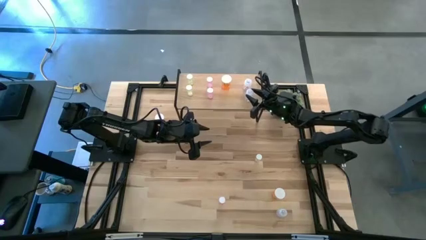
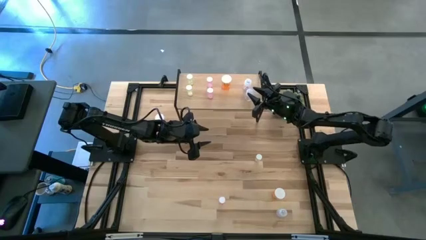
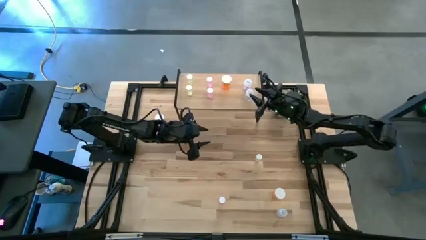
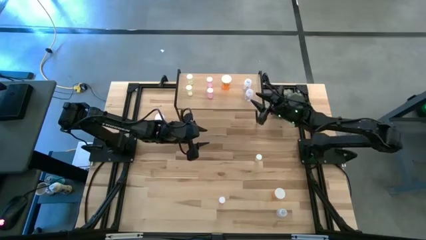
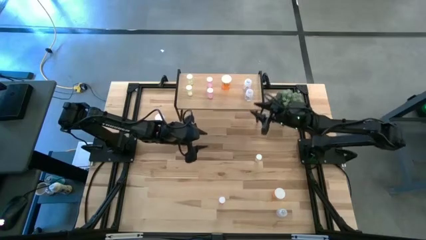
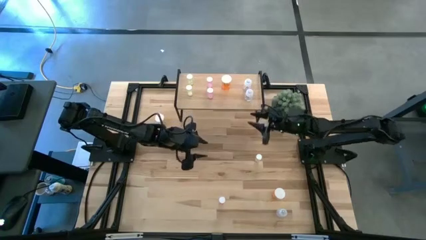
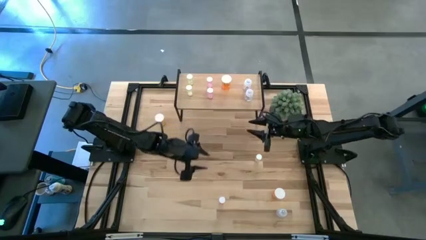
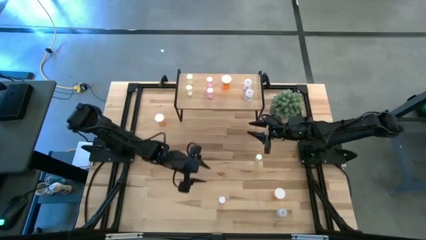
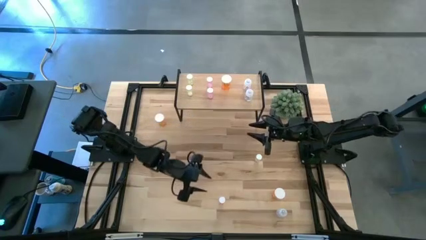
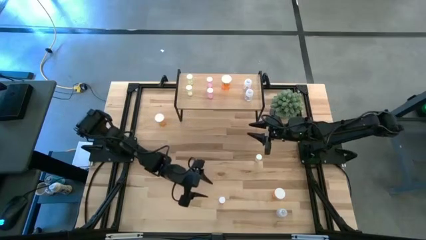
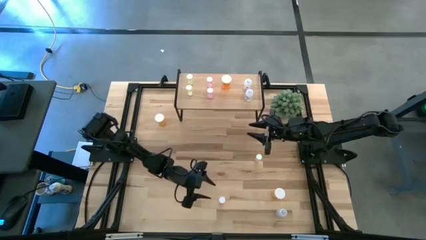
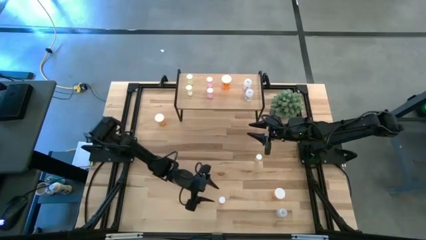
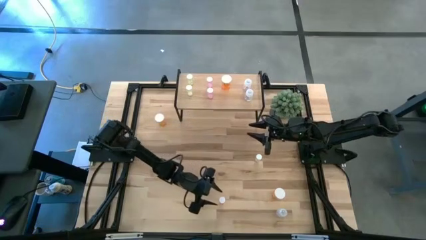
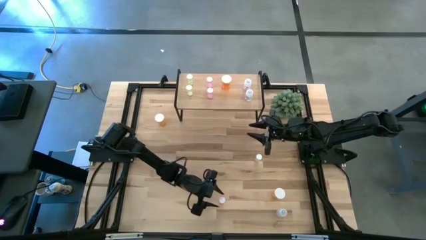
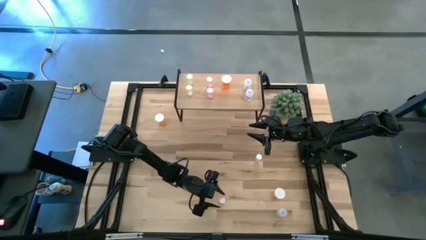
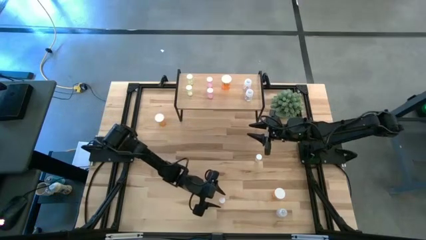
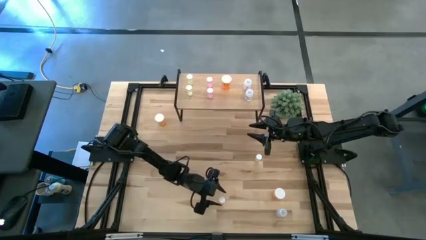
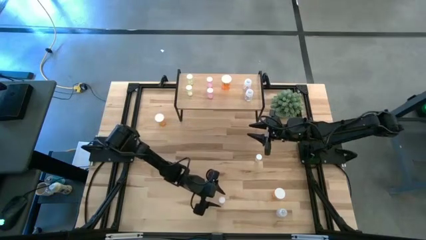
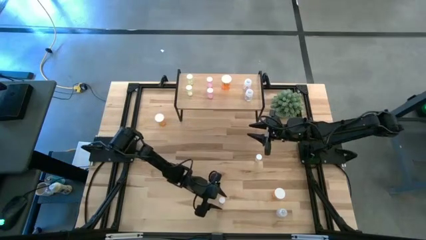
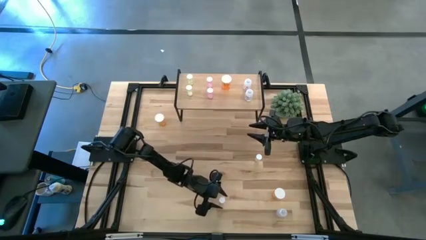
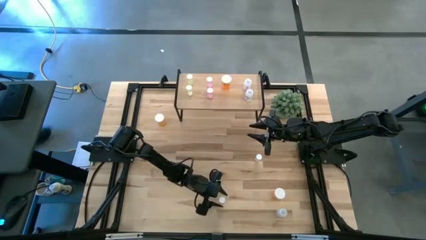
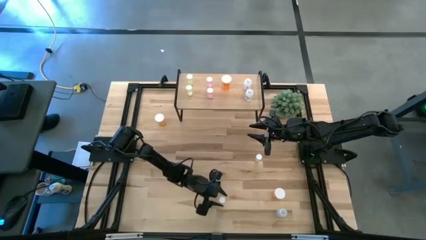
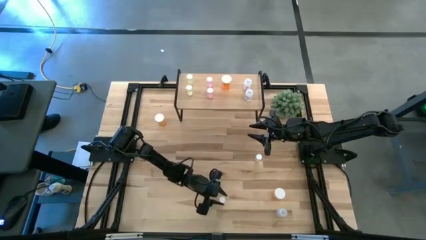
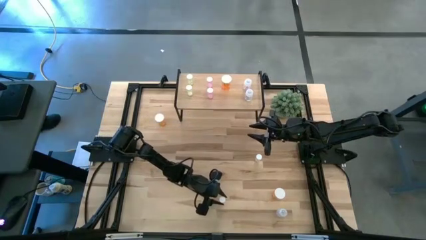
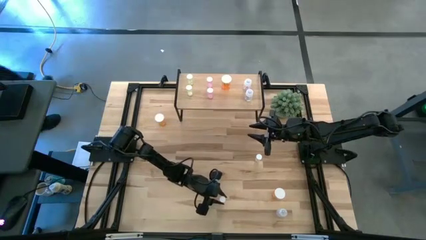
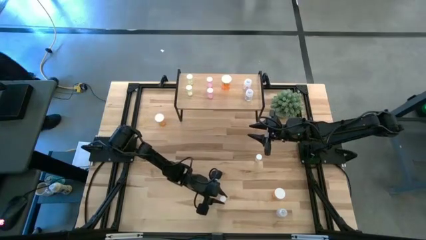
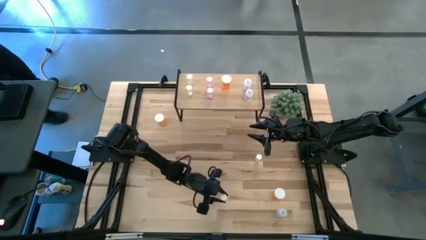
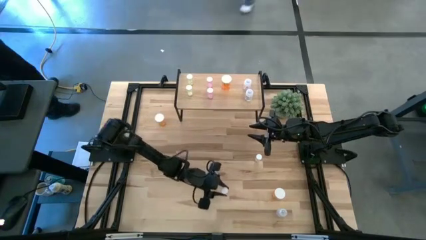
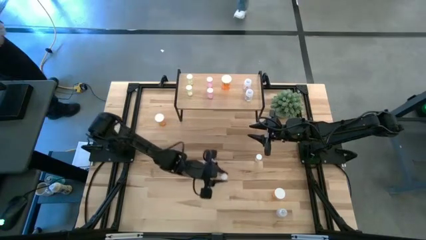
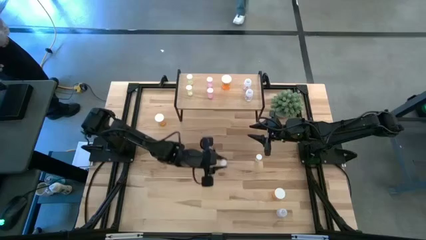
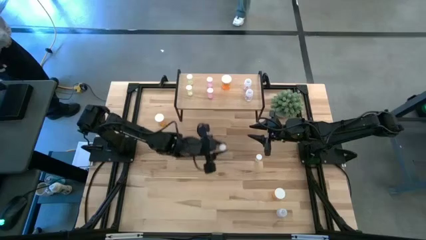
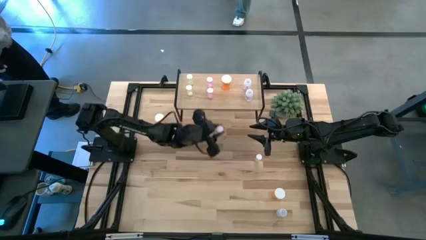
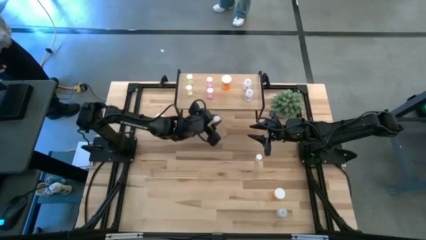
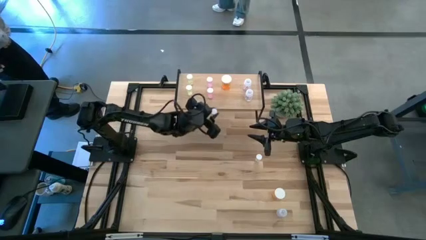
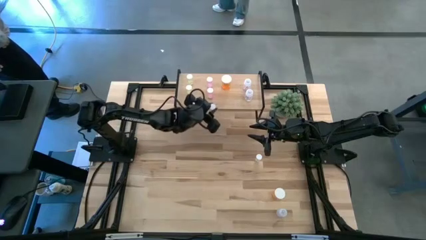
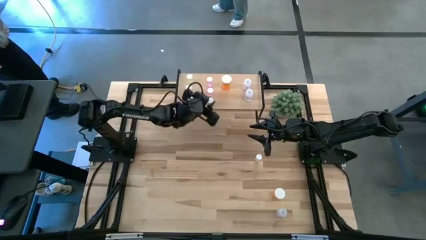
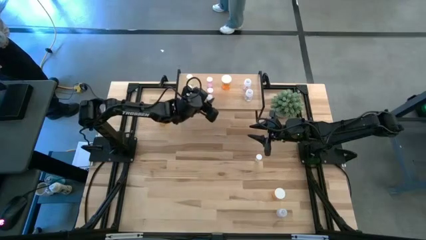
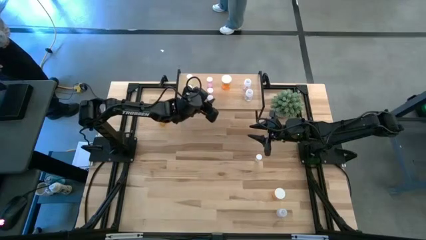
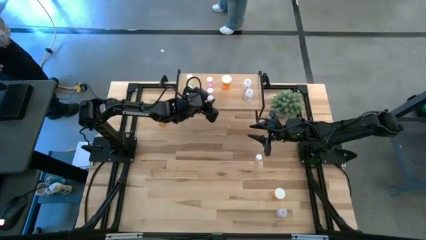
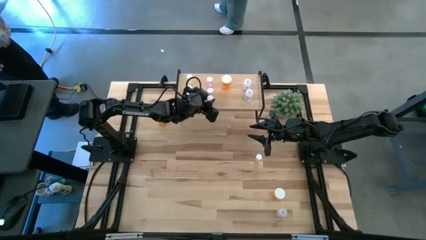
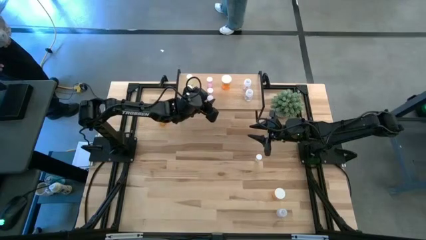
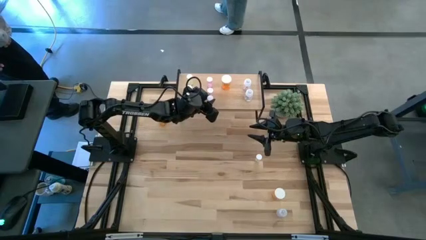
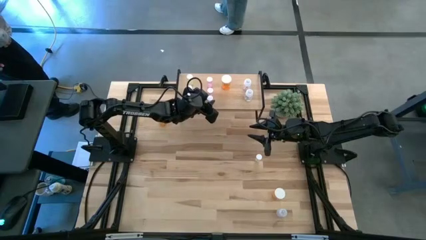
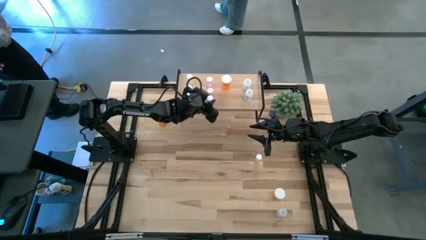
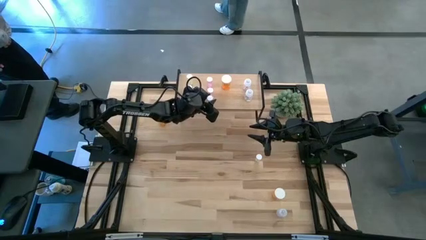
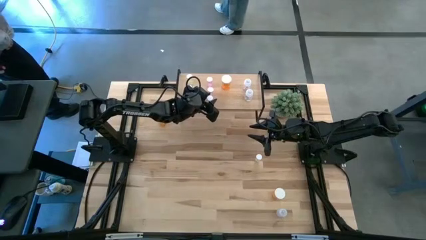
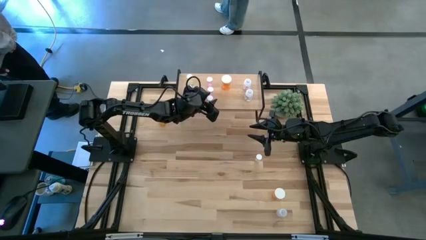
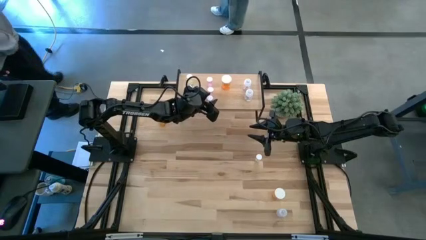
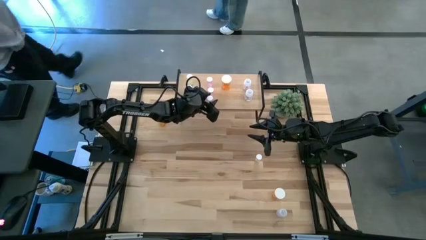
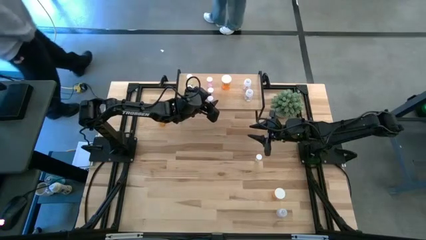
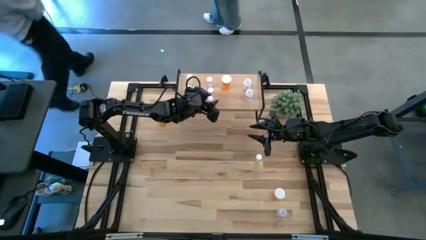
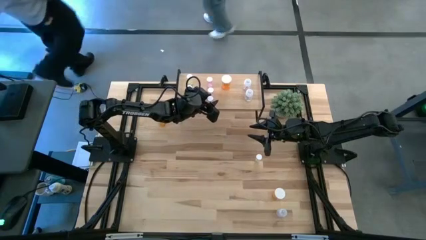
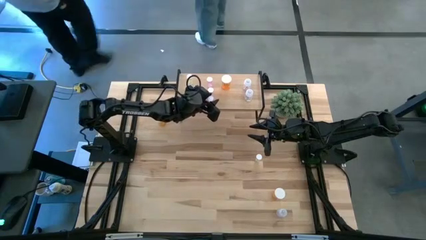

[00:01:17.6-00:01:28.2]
Task: Pick and place medicine bottles onto shelf by color
Put the pink pill bottle aligned with the other pink pill bottles on the shelf
